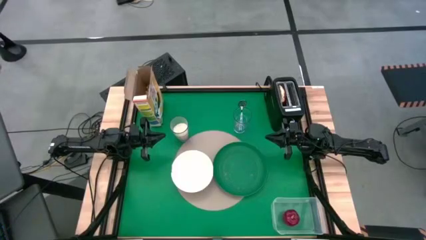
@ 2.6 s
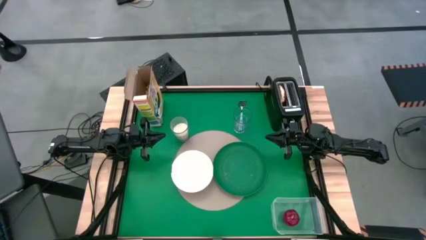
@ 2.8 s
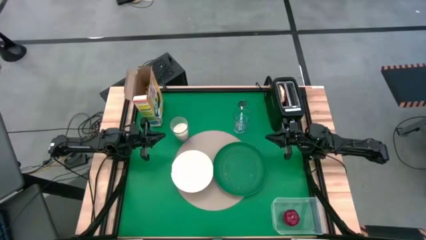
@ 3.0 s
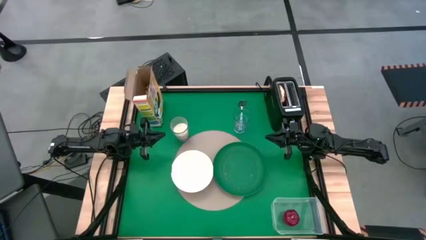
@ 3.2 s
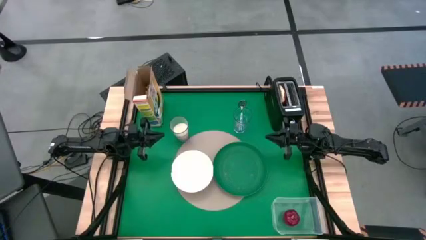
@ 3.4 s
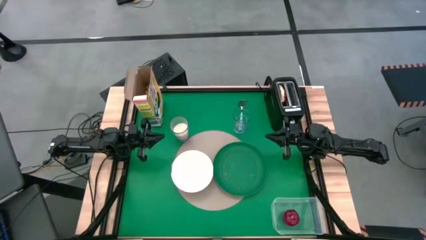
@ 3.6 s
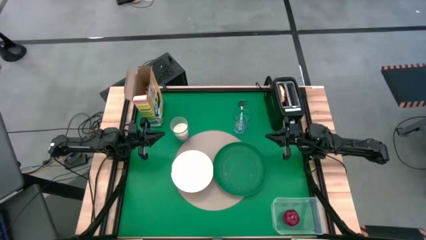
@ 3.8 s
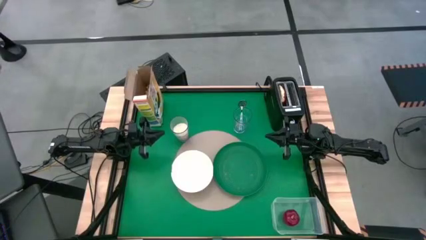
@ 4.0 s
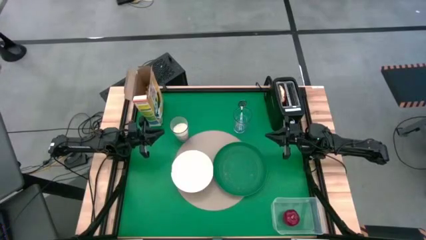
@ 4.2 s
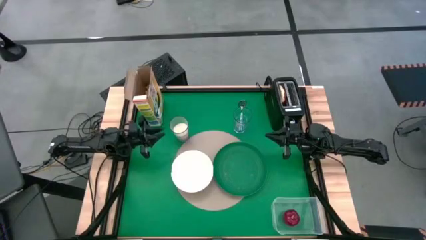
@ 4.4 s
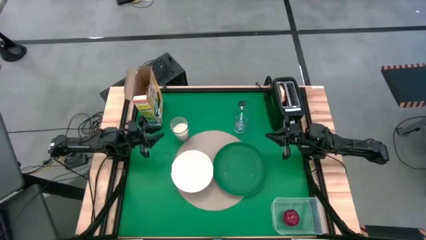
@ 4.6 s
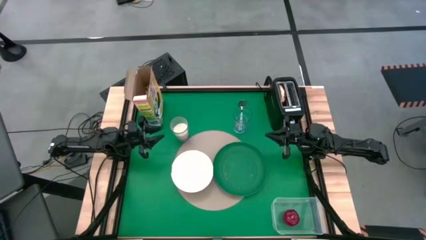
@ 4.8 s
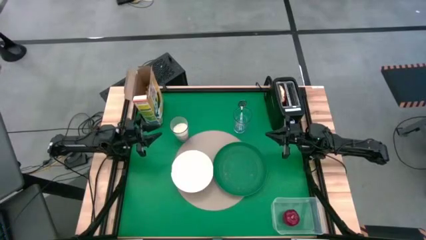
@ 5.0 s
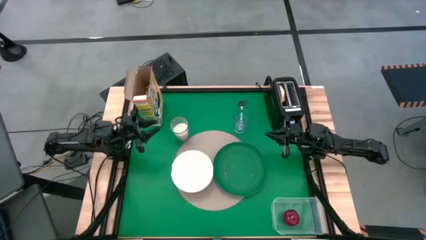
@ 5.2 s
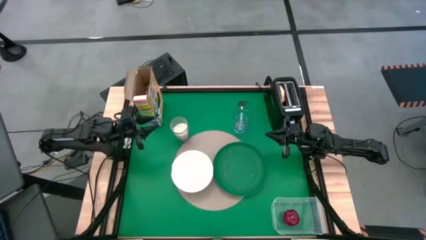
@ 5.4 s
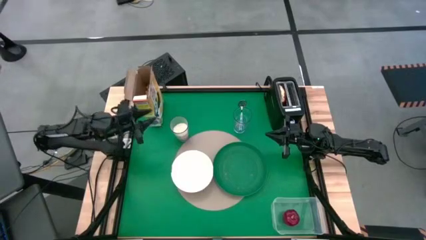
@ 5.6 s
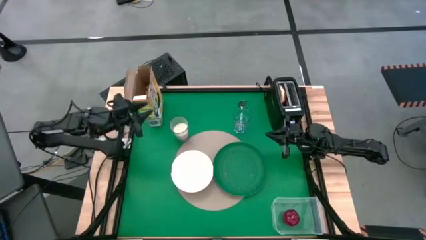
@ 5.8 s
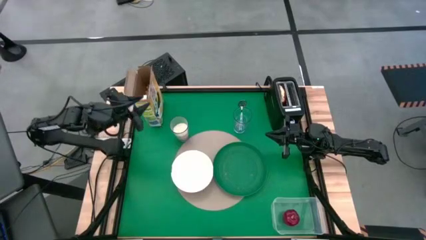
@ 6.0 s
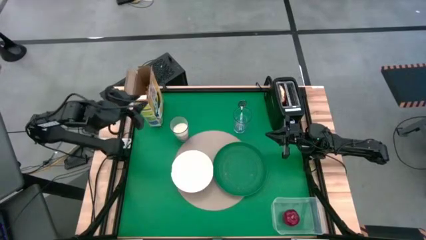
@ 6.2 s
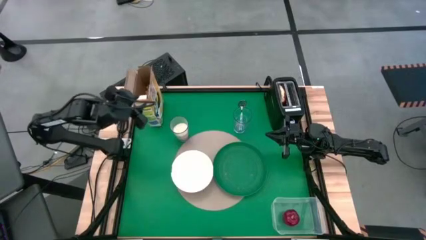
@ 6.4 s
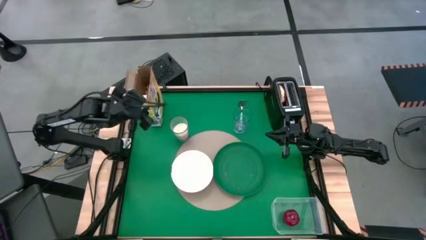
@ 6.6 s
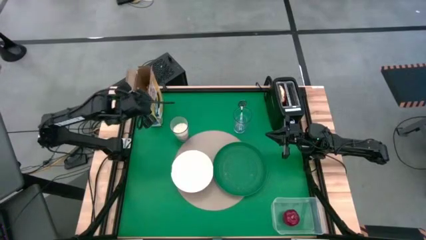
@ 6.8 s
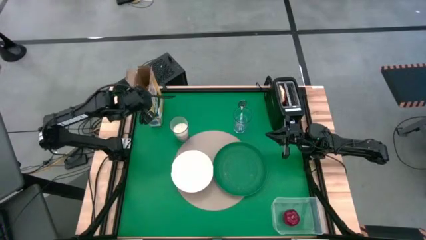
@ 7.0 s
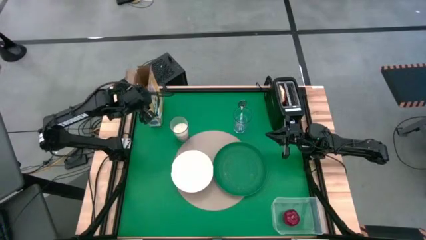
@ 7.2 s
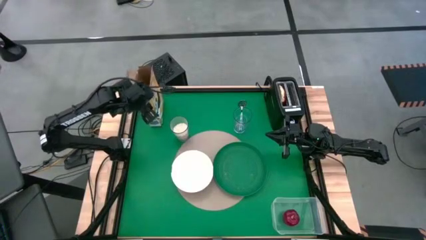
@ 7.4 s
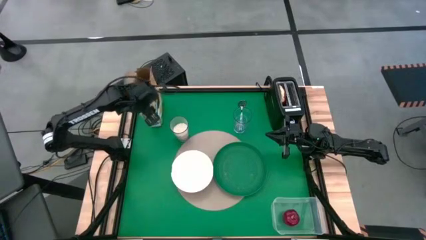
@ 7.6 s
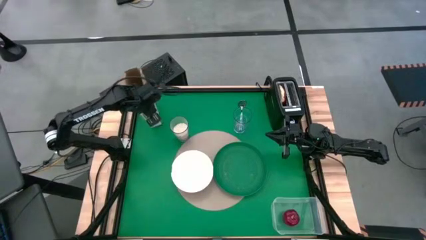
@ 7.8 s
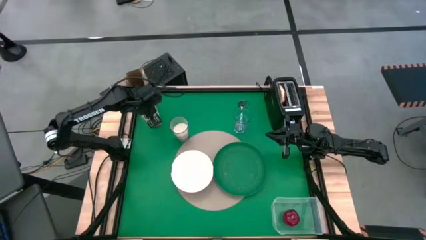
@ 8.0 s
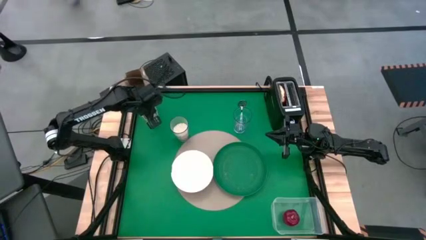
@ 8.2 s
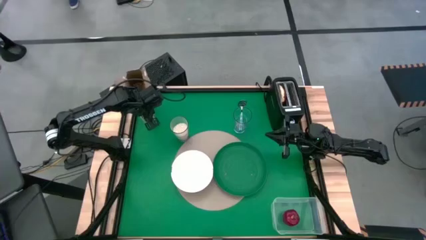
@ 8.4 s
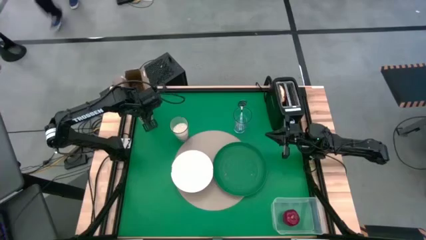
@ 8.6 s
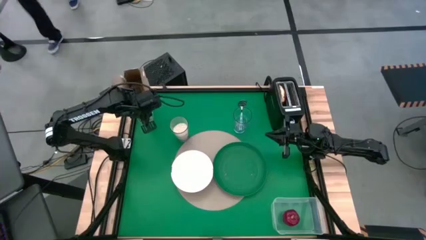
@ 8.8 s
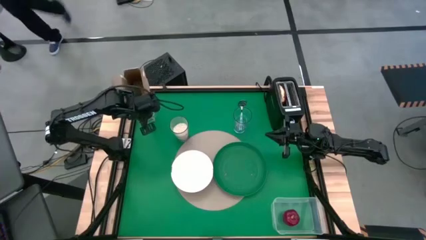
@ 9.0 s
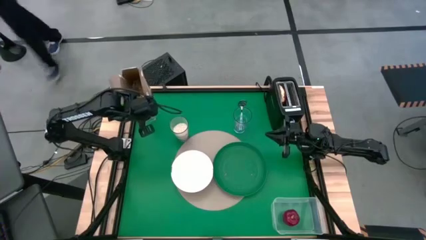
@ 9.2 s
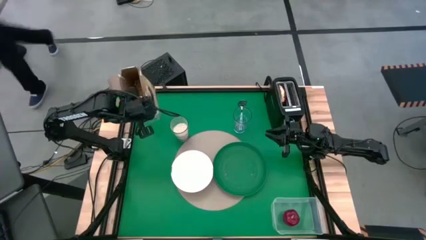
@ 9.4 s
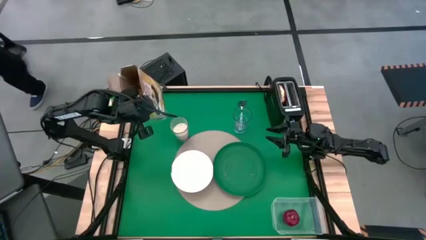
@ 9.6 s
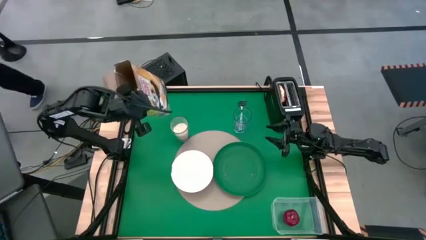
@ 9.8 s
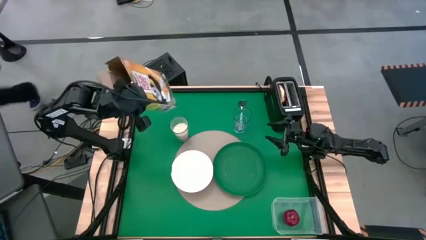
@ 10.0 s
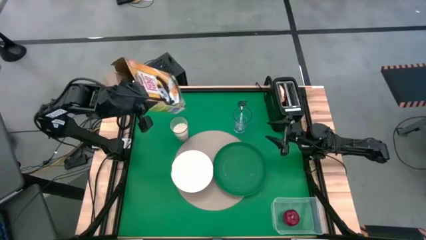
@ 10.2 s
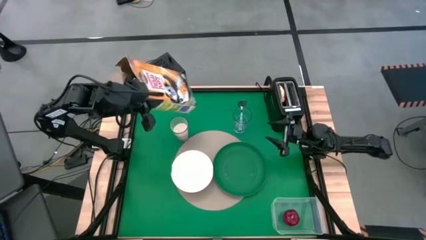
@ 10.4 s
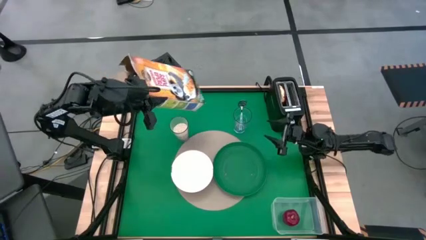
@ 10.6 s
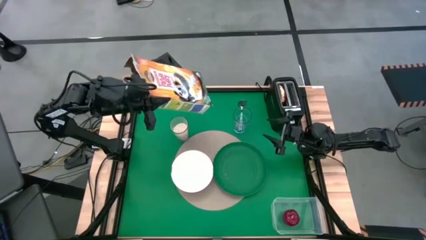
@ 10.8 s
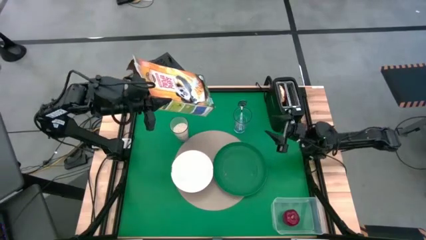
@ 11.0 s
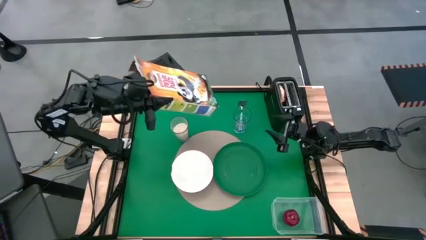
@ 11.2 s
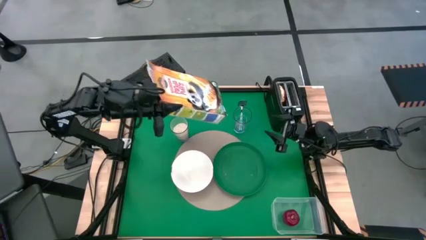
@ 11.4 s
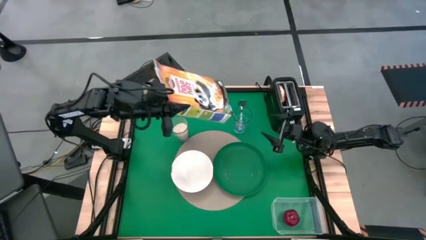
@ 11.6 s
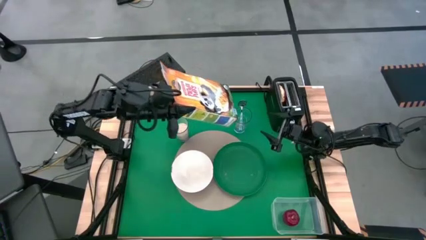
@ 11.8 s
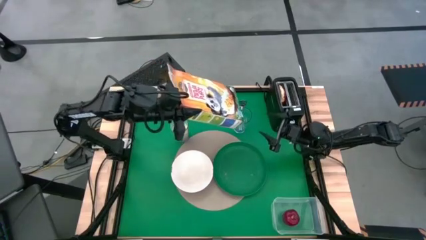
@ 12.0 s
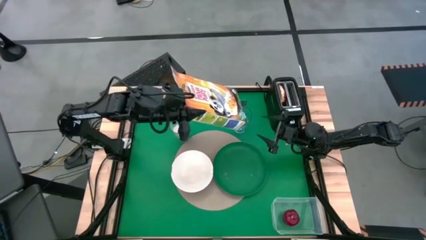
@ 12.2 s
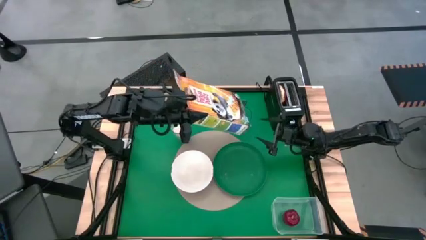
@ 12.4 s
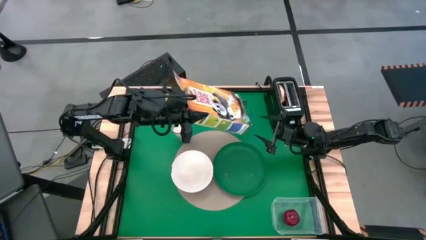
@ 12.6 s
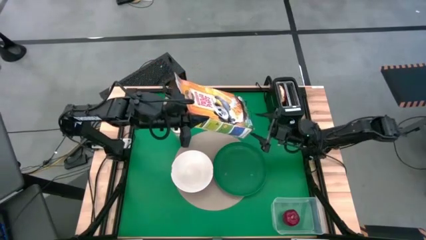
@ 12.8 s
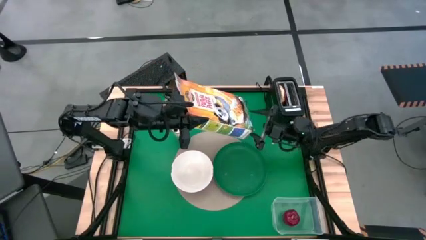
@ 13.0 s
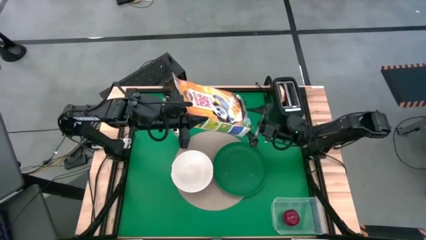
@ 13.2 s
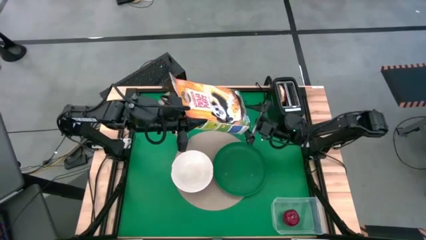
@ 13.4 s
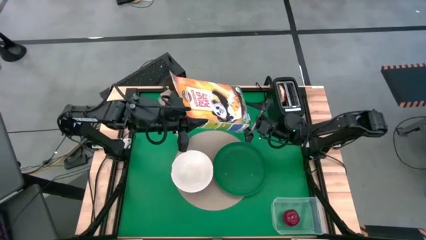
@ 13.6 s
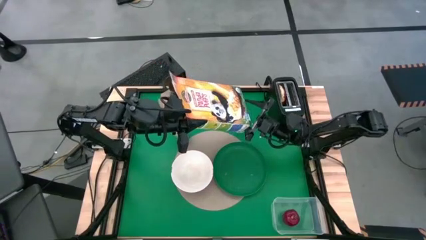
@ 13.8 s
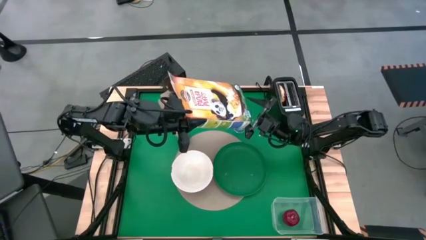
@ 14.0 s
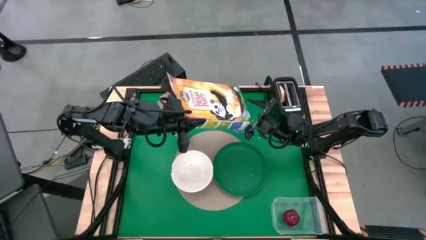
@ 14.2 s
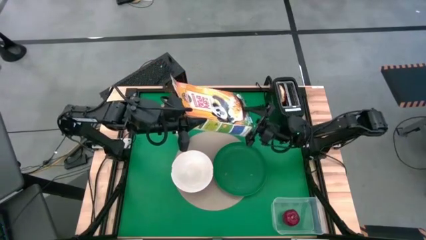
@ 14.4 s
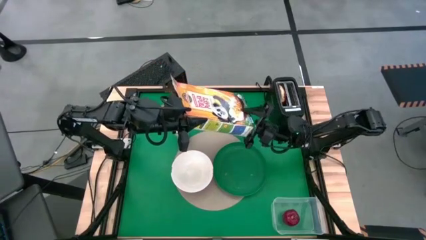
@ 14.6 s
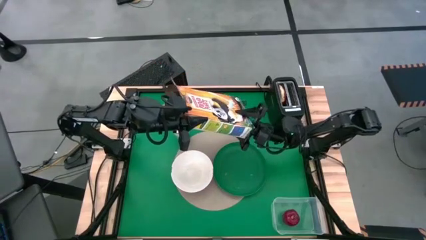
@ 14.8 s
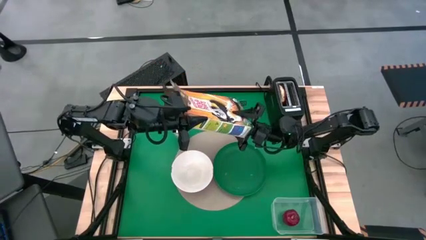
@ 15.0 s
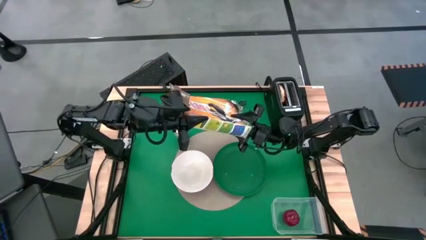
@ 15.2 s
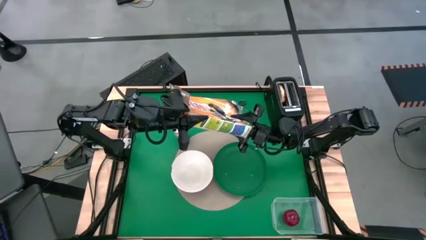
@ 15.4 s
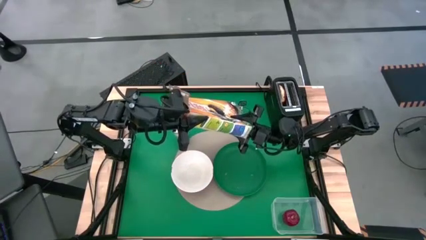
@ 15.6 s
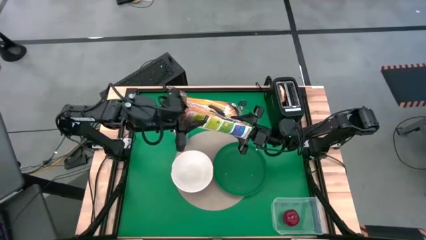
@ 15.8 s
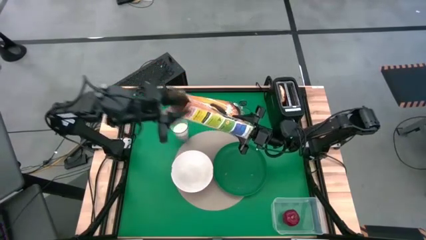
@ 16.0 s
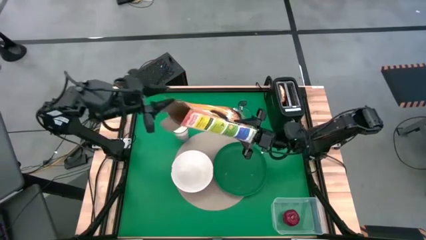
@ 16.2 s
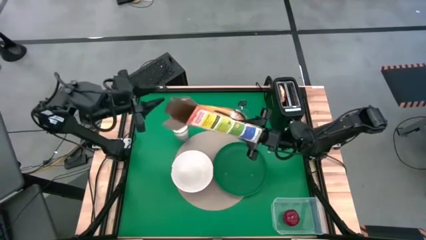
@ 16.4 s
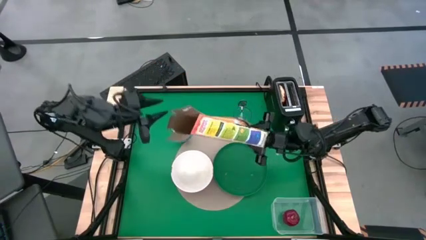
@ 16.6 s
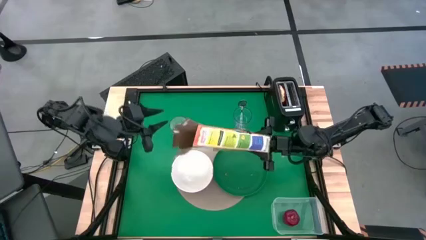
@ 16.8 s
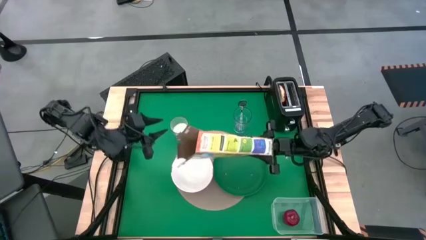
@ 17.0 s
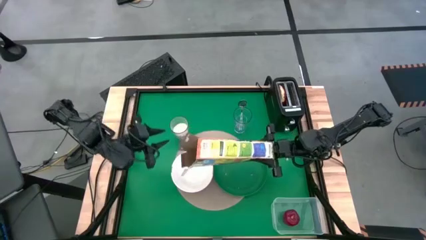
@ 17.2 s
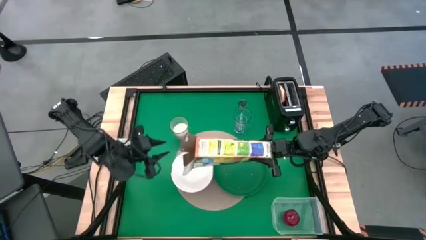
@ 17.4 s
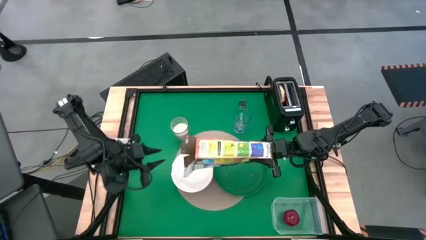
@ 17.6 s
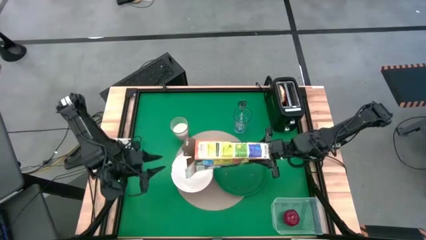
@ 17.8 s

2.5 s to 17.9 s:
Task: Arrange a breakfast setting
Pour the cereal into the white bowl
